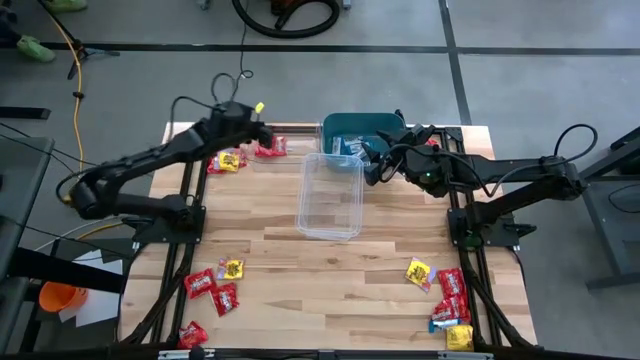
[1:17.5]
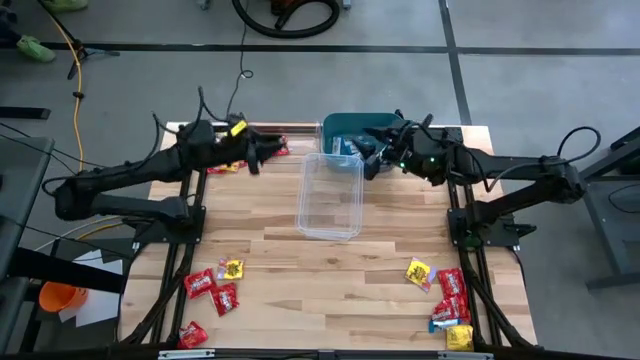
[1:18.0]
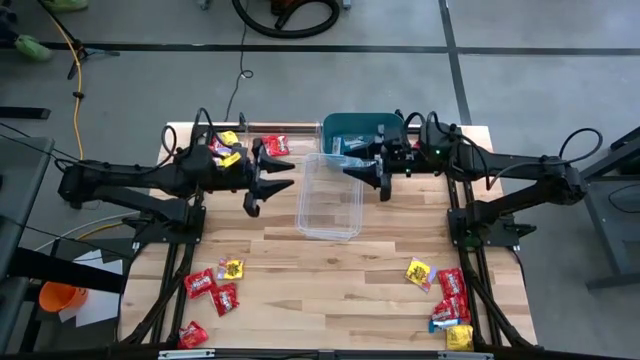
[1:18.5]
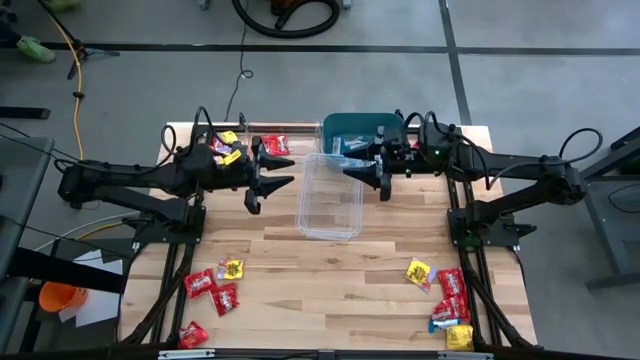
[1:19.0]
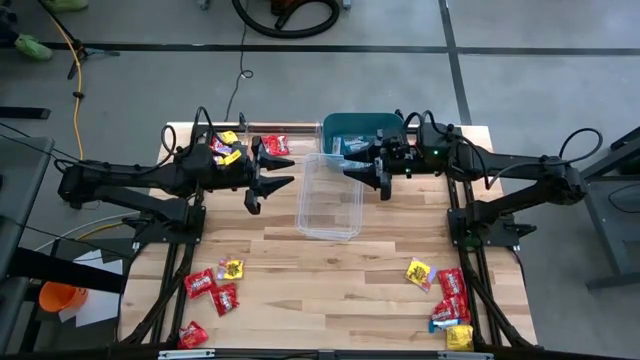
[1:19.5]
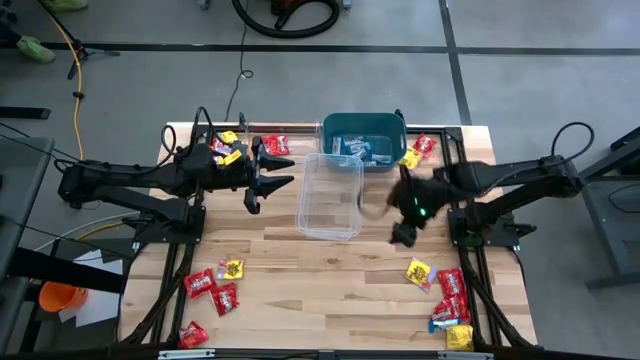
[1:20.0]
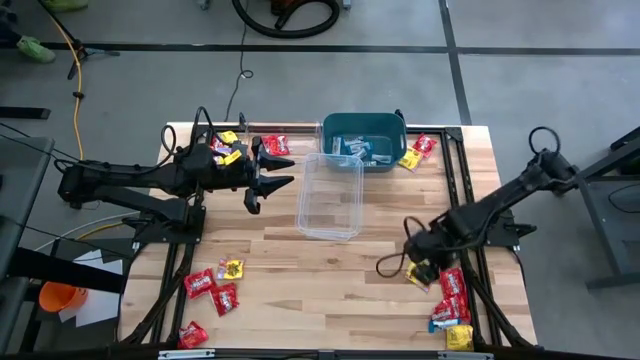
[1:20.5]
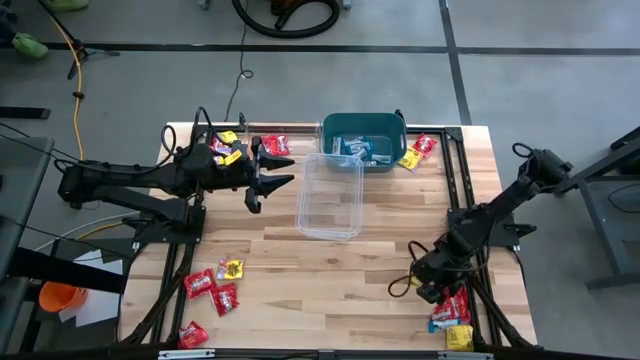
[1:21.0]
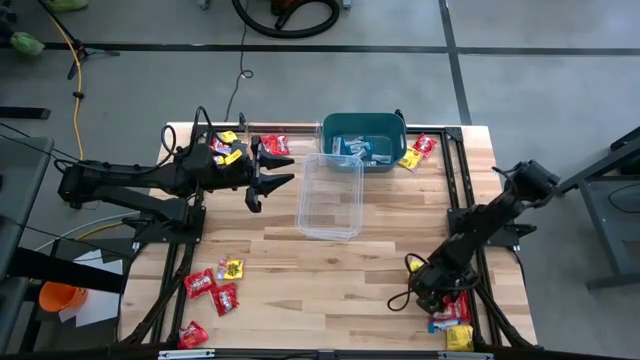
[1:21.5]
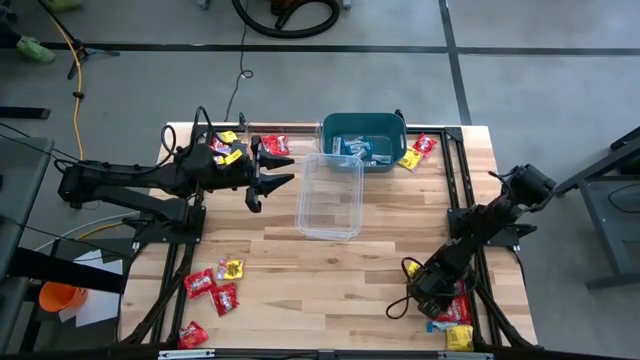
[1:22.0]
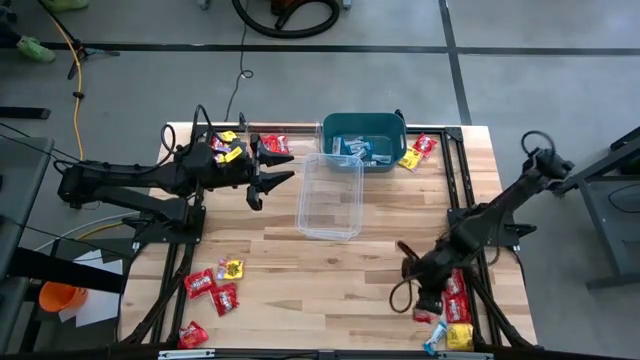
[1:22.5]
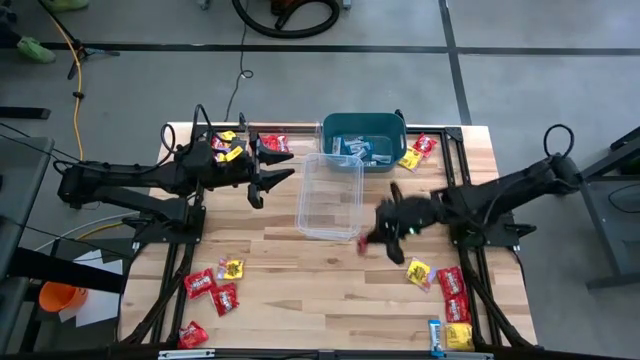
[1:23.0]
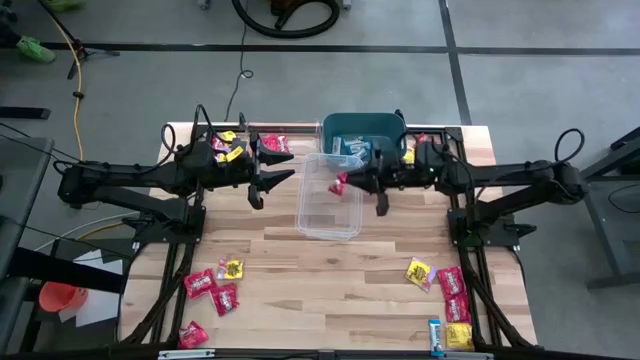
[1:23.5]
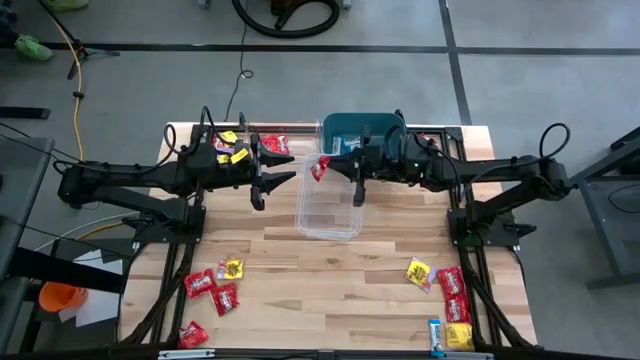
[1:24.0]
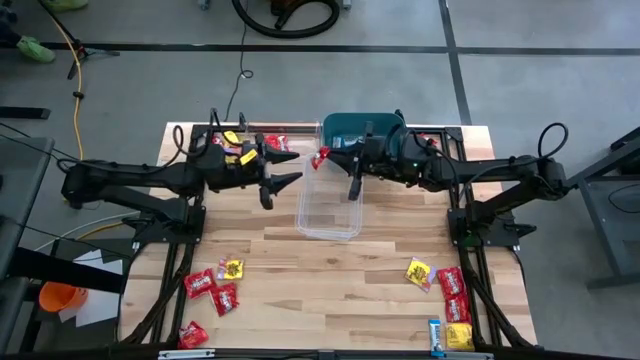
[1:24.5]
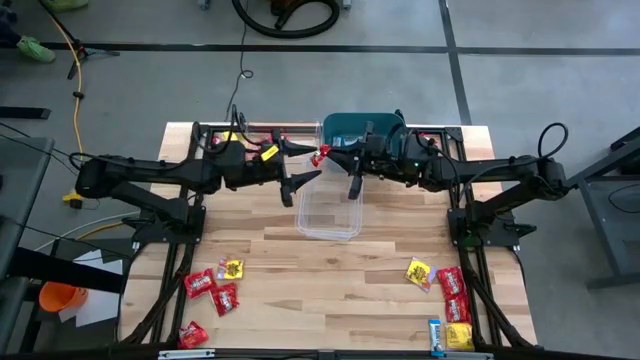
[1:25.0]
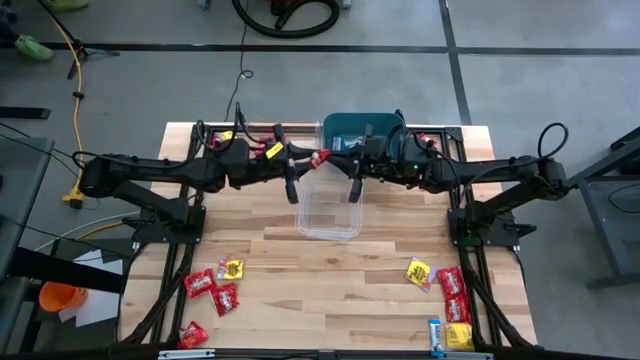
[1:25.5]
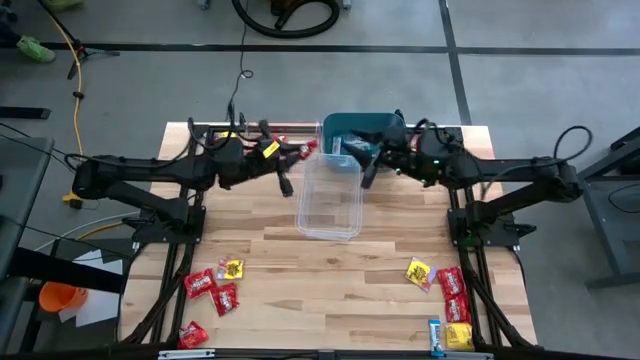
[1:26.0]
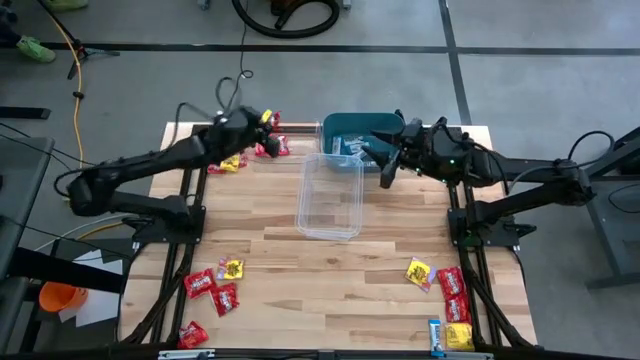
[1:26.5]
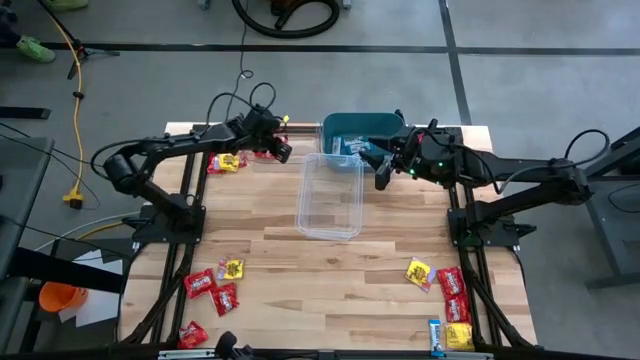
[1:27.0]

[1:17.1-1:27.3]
Task: Sort candy
Put the red candy into the transparent bin

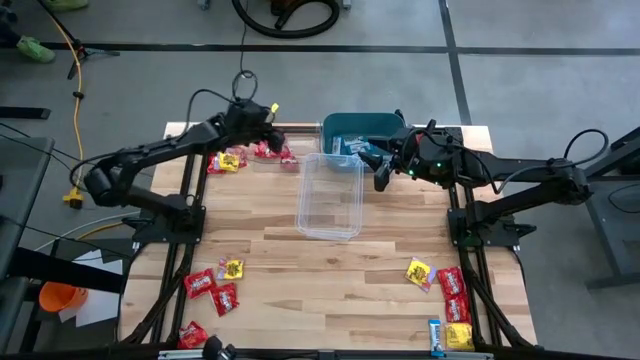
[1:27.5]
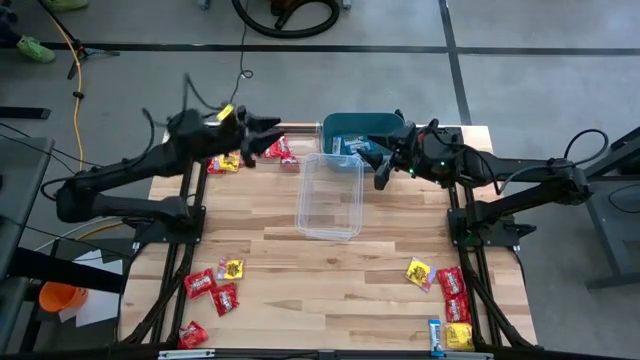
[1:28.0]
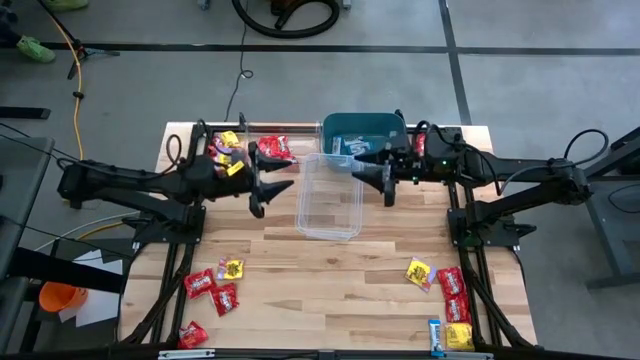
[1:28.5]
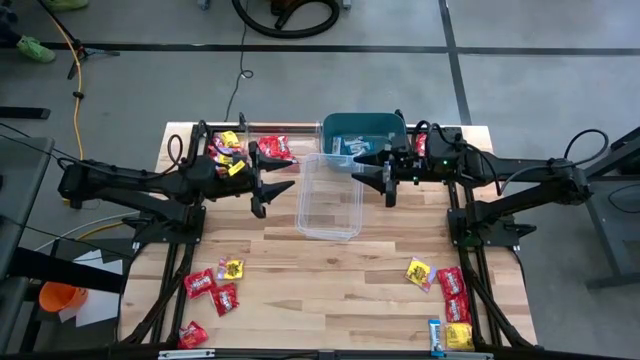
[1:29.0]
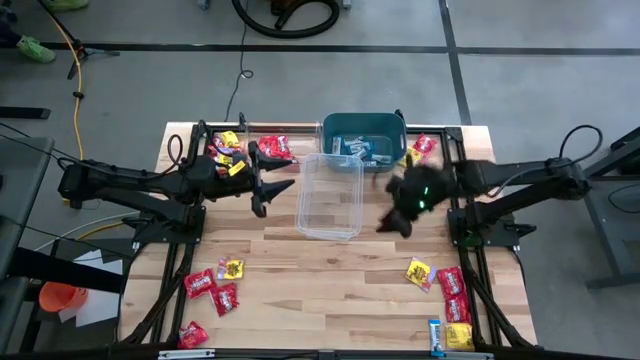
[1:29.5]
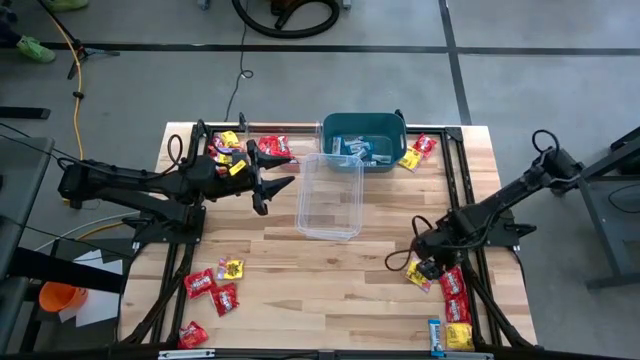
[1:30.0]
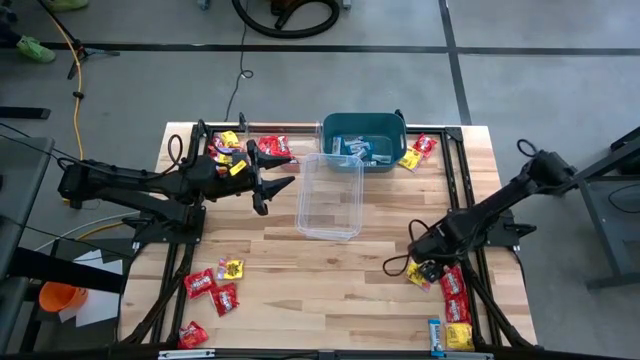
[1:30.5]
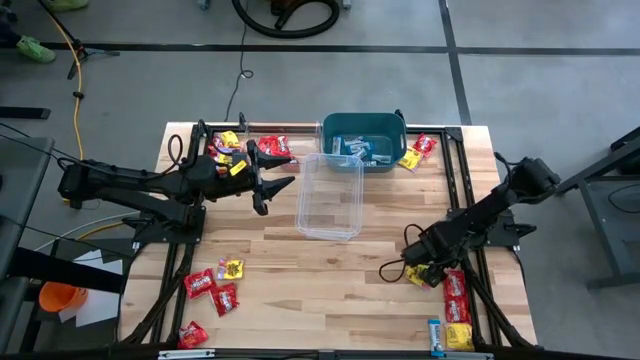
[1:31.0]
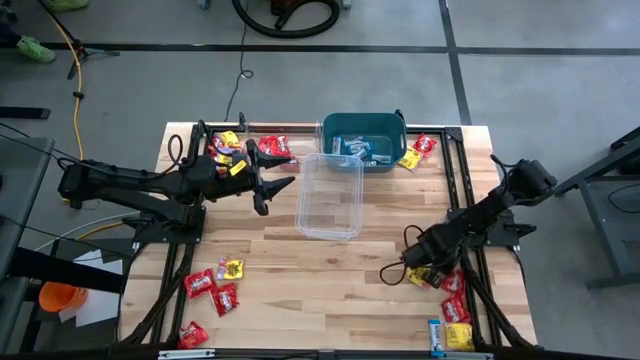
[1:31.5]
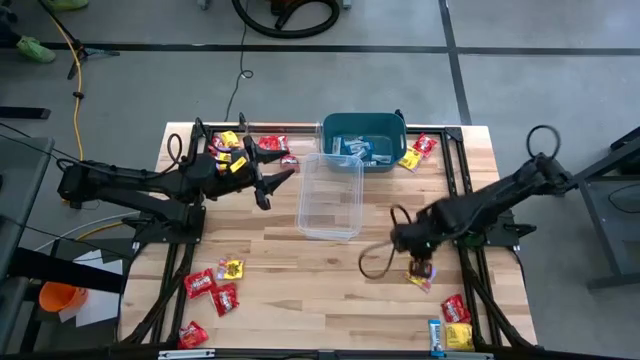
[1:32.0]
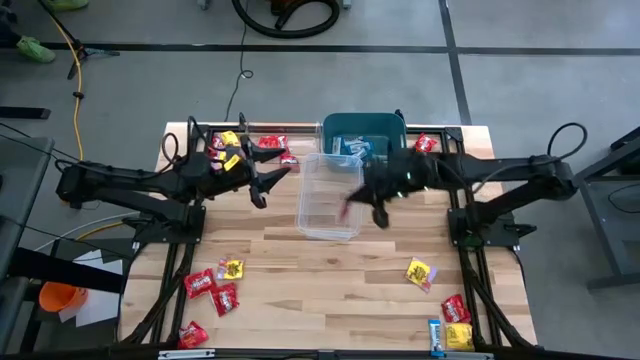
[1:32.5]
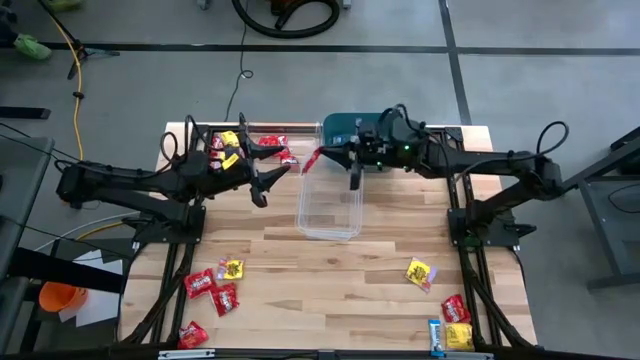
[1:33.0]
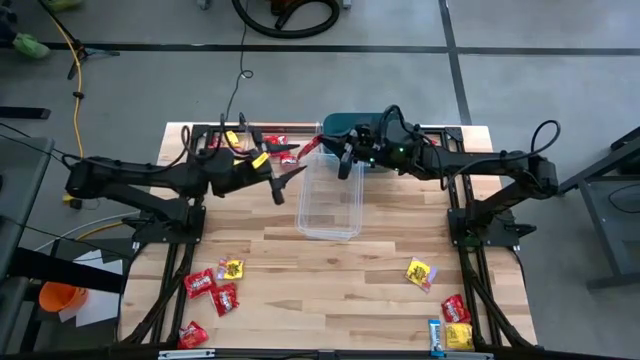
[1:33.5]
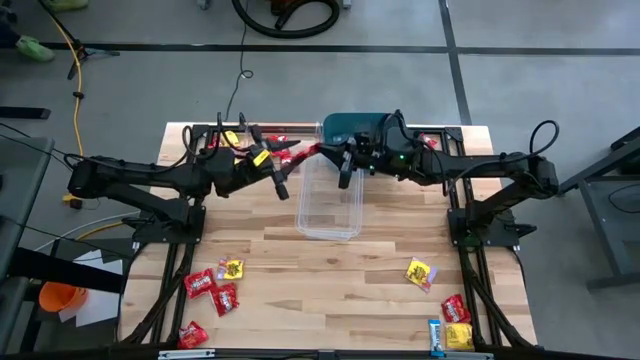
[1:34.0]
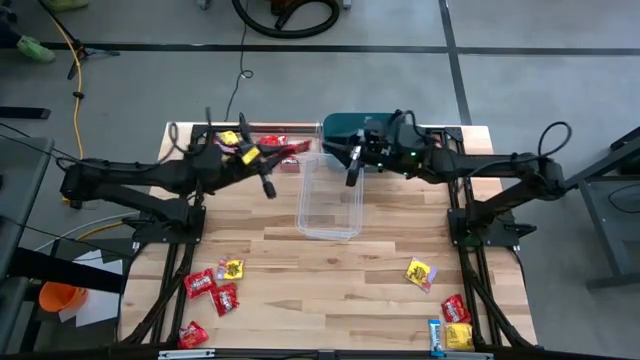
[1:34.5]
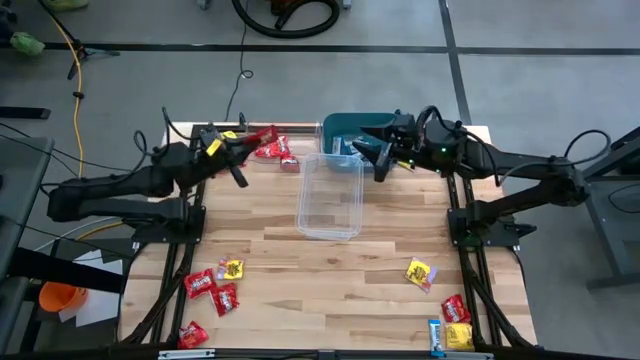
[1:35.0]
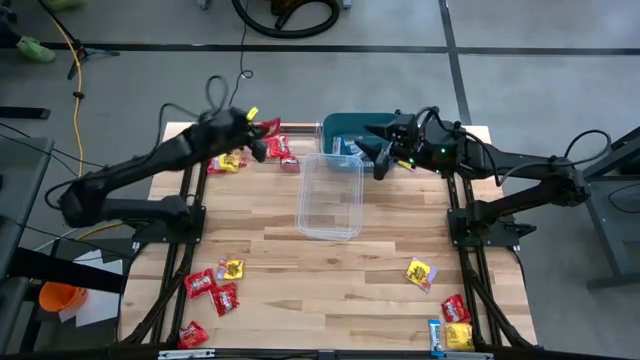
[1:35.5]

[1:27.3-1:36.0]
Put the red candy into the transparent bin

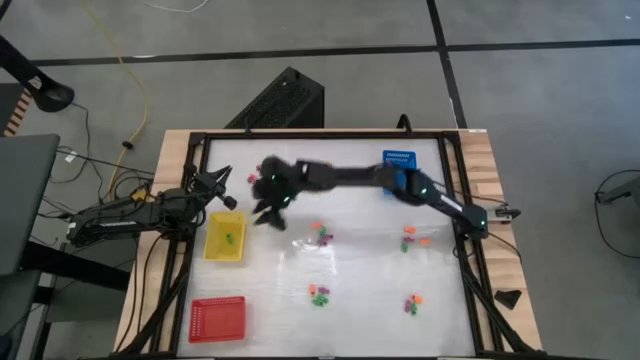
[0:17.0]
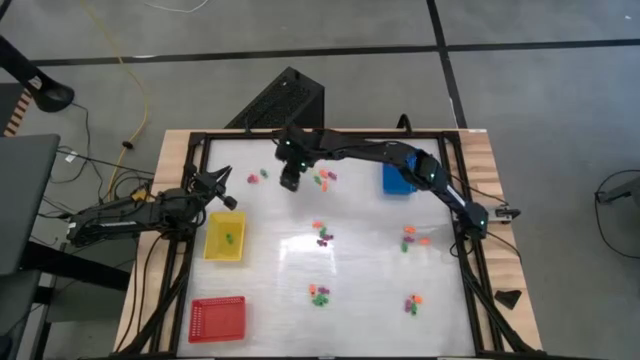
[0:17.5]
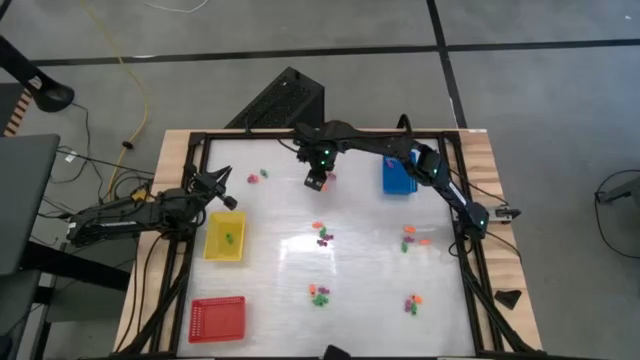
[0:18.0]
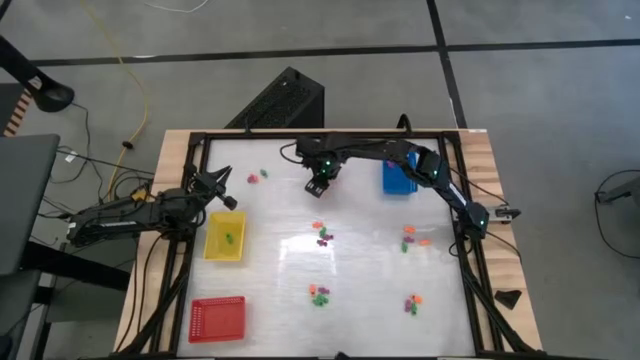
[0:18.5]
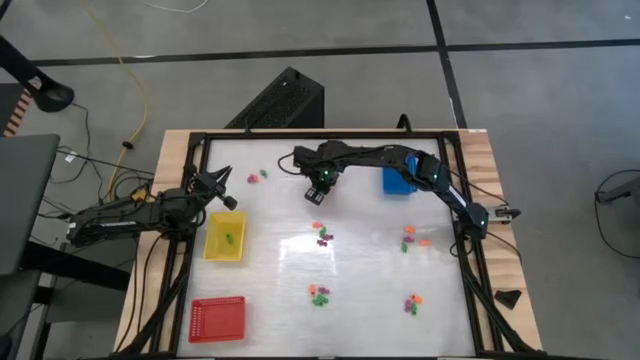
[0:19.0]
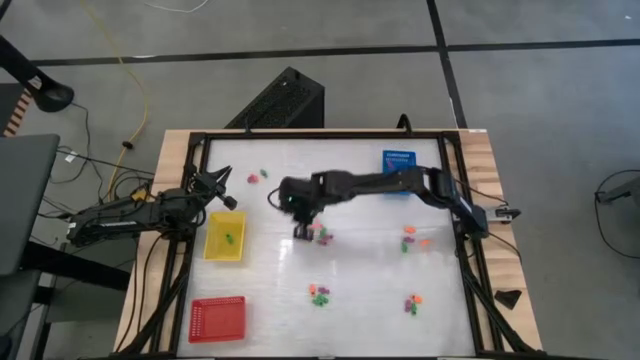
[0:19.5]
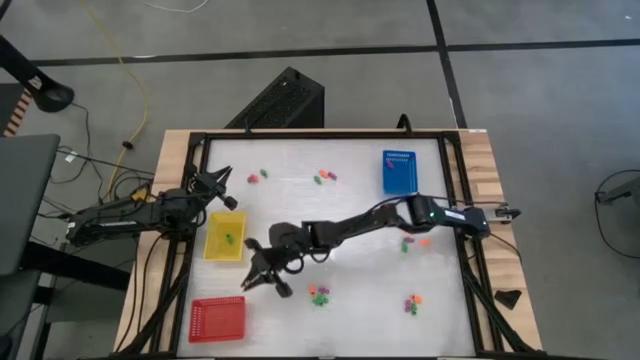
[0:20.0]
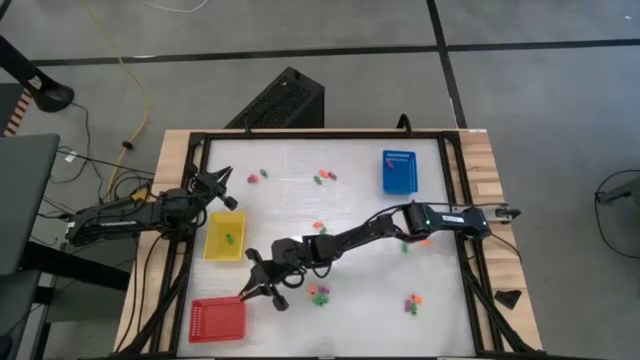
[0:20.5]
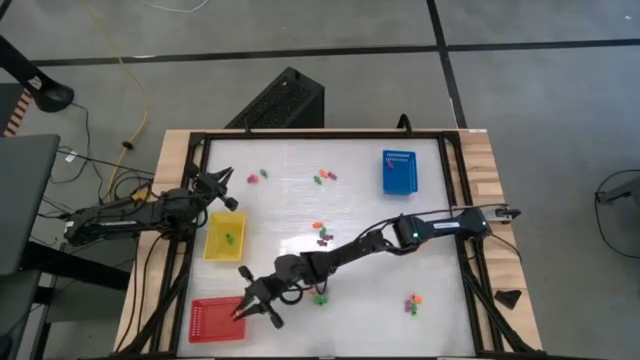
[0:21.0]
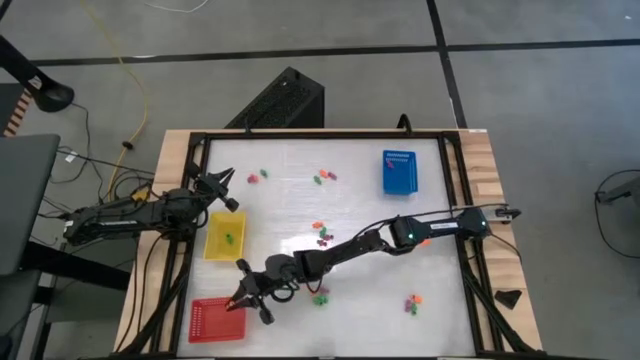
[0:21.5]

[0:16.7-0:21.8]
Task: Sort Halloween decoration
Put the orange skeleton toy into the red bin
